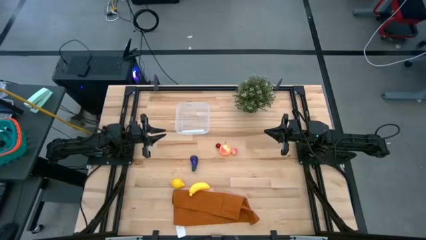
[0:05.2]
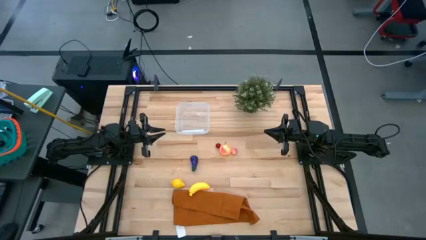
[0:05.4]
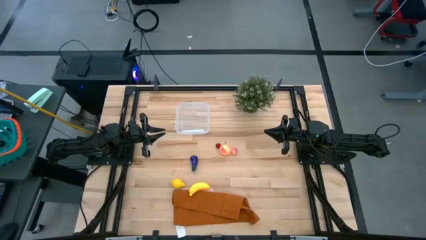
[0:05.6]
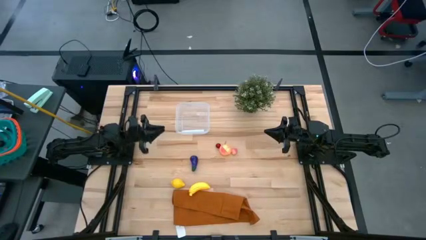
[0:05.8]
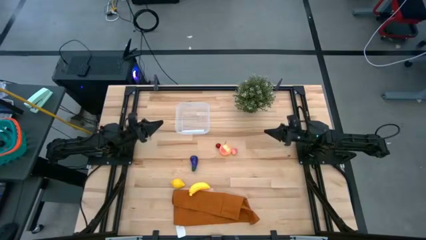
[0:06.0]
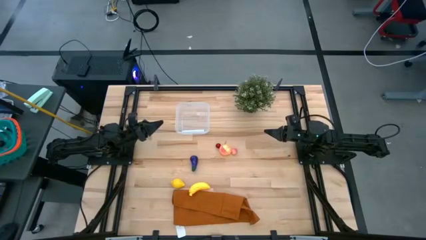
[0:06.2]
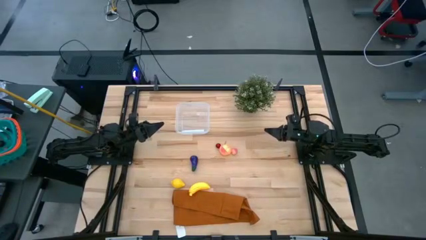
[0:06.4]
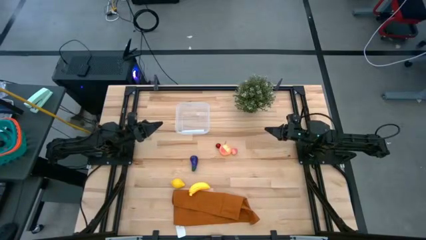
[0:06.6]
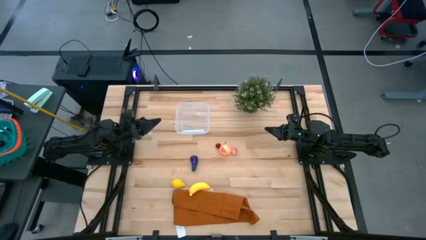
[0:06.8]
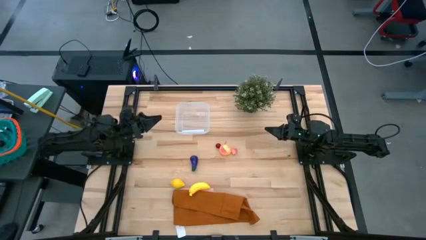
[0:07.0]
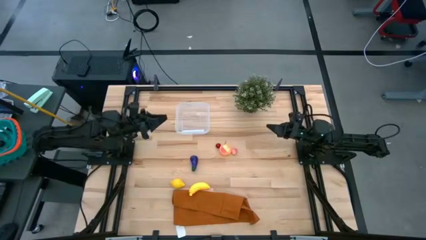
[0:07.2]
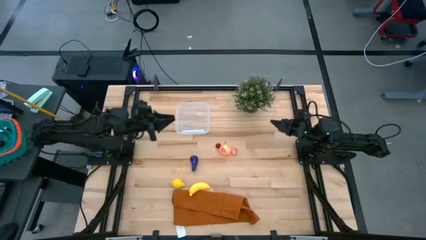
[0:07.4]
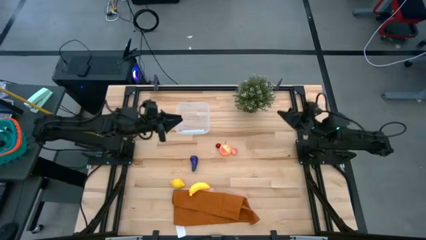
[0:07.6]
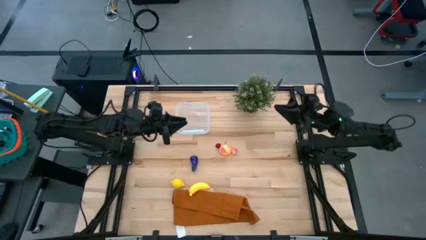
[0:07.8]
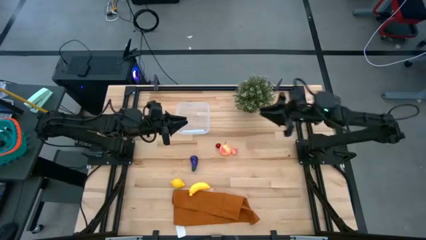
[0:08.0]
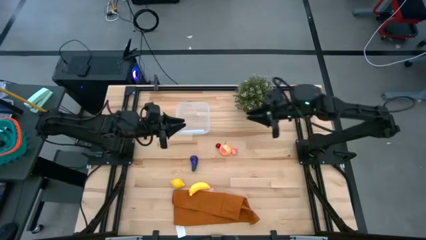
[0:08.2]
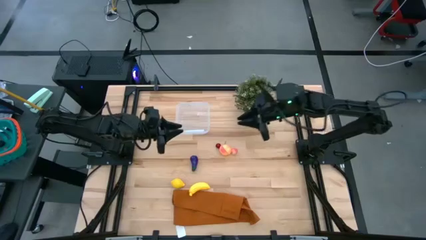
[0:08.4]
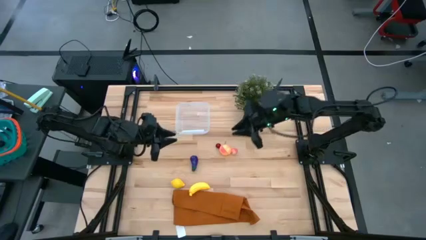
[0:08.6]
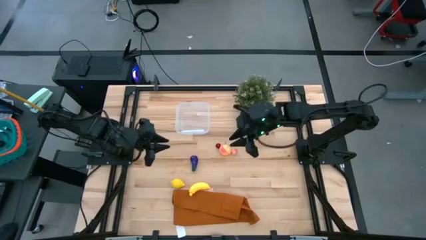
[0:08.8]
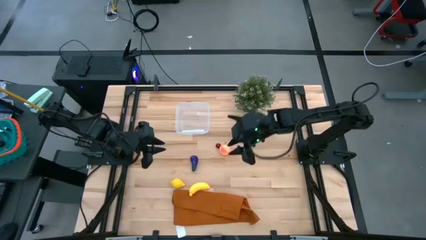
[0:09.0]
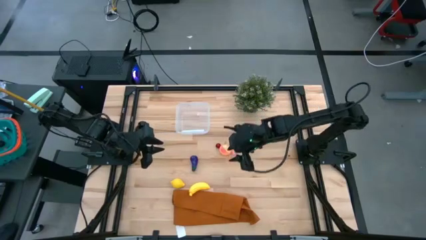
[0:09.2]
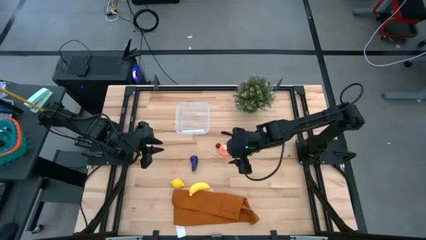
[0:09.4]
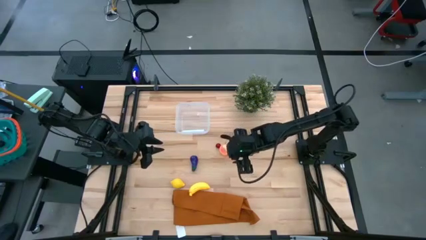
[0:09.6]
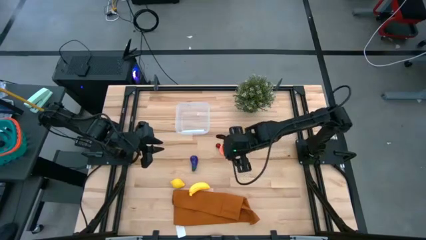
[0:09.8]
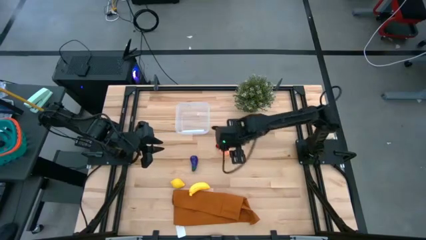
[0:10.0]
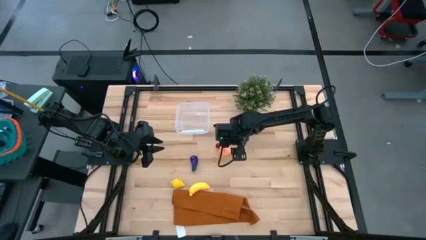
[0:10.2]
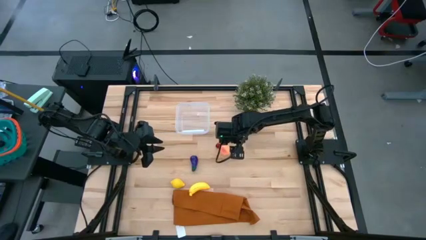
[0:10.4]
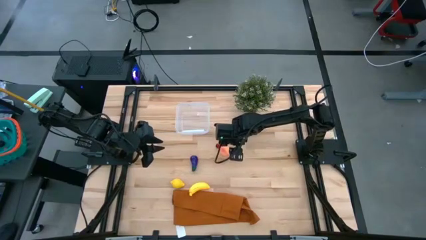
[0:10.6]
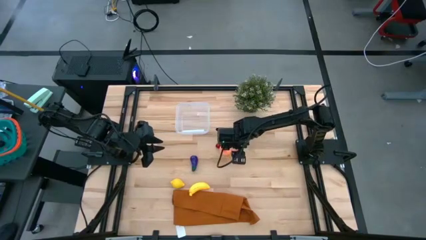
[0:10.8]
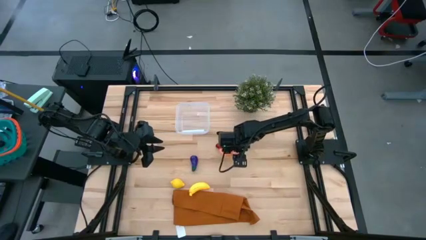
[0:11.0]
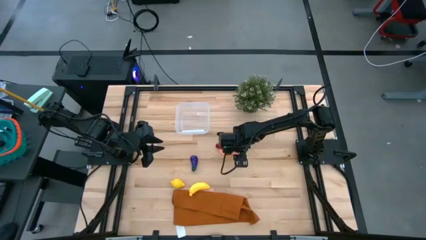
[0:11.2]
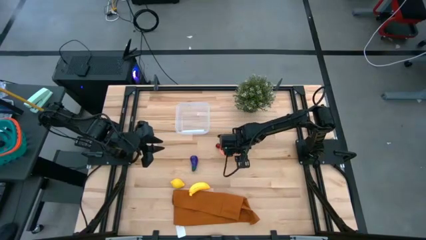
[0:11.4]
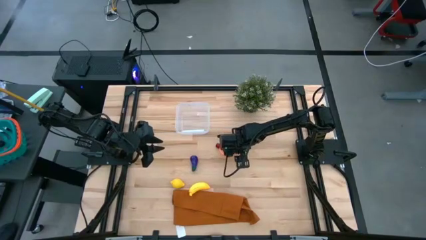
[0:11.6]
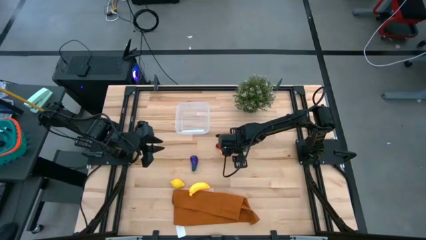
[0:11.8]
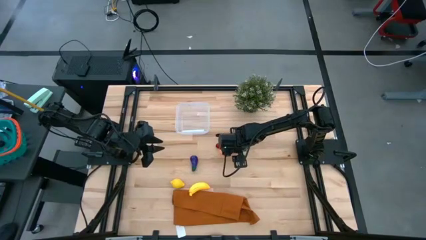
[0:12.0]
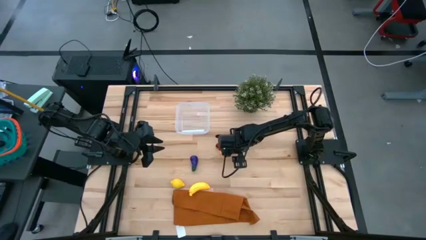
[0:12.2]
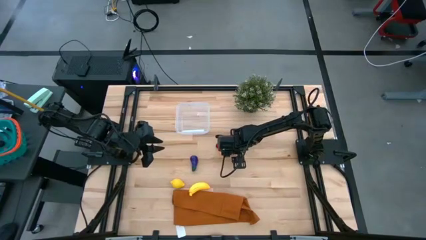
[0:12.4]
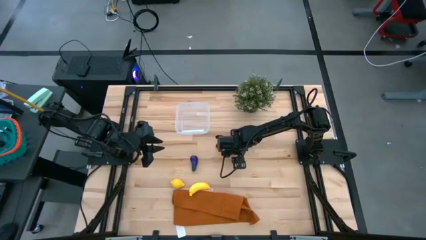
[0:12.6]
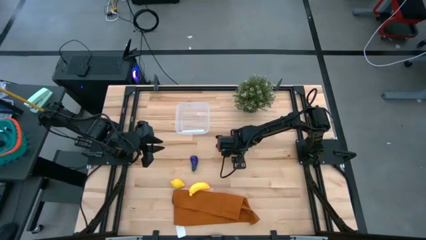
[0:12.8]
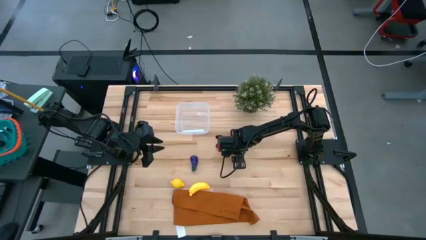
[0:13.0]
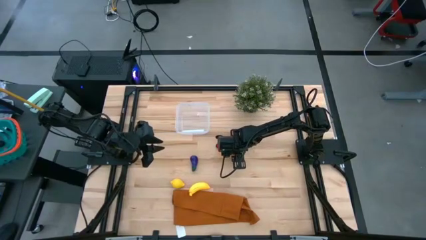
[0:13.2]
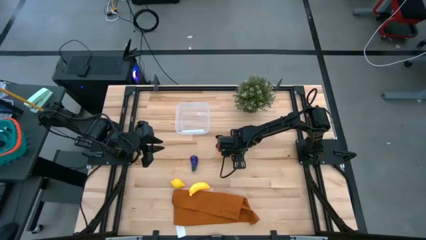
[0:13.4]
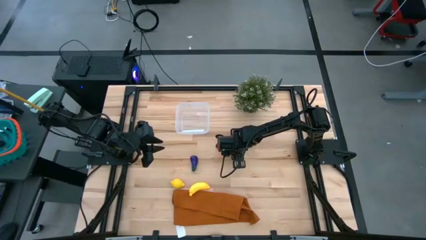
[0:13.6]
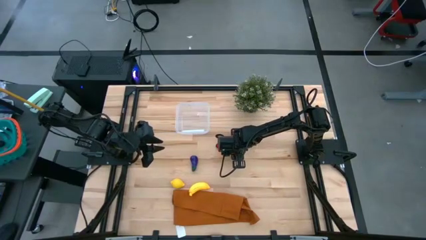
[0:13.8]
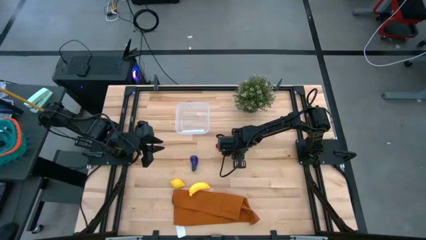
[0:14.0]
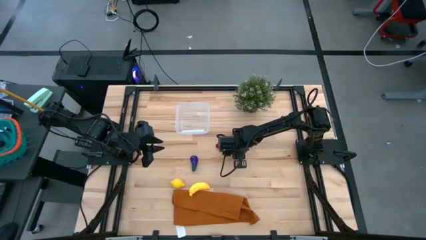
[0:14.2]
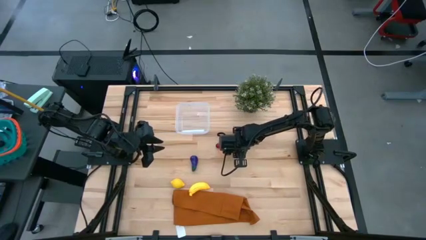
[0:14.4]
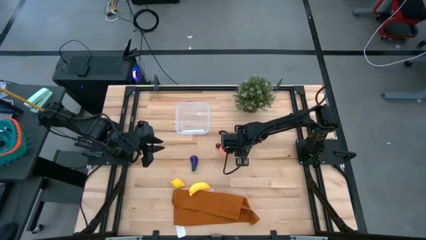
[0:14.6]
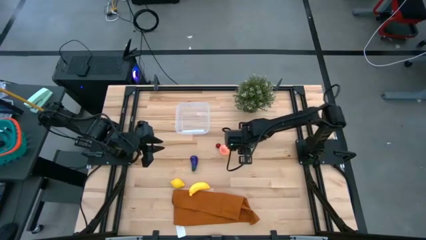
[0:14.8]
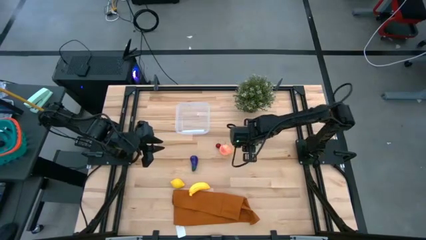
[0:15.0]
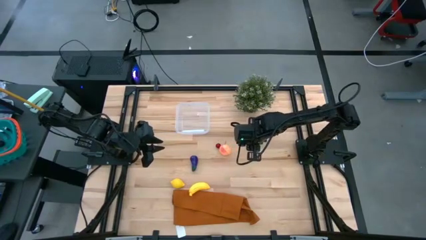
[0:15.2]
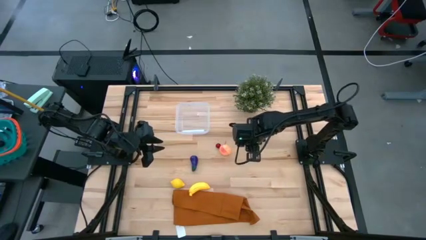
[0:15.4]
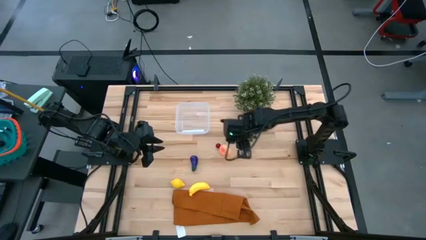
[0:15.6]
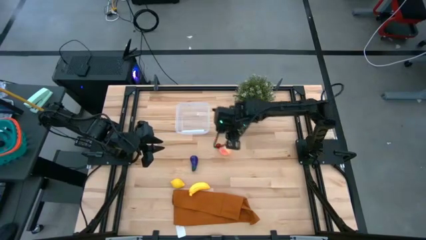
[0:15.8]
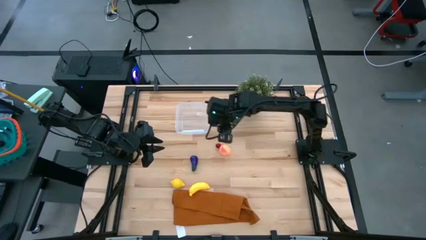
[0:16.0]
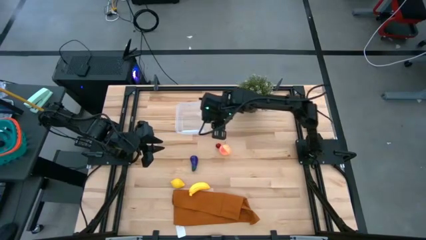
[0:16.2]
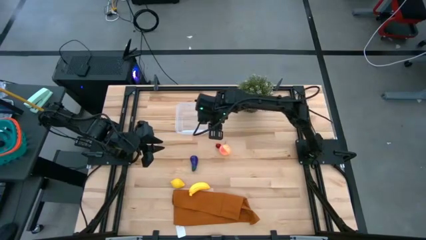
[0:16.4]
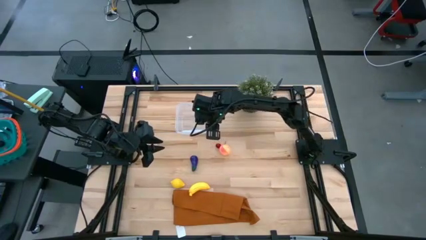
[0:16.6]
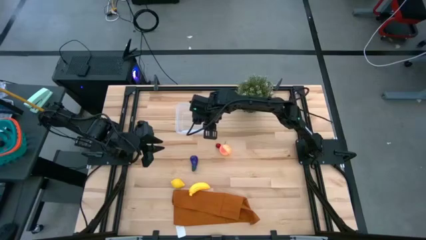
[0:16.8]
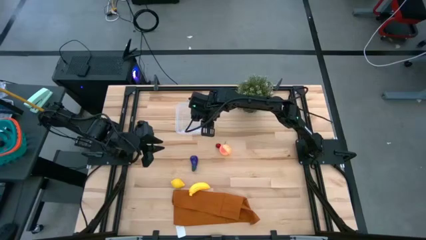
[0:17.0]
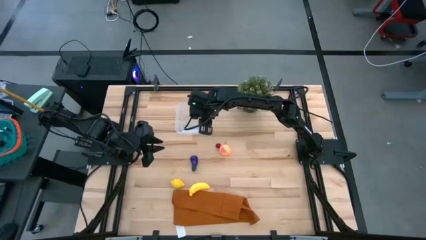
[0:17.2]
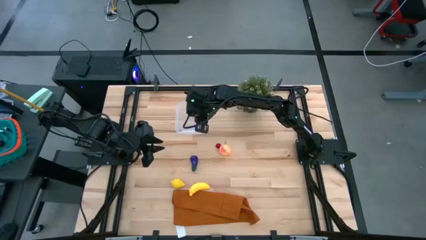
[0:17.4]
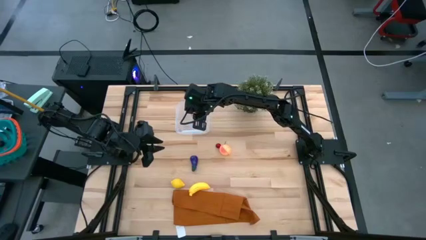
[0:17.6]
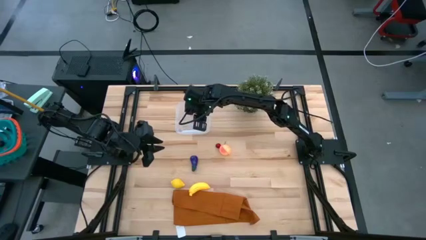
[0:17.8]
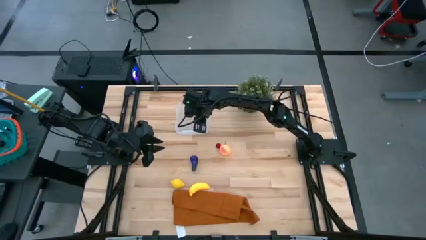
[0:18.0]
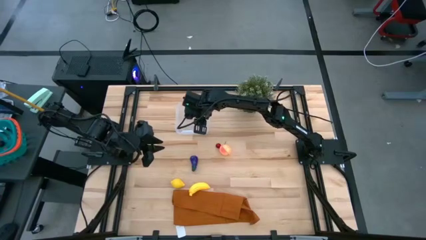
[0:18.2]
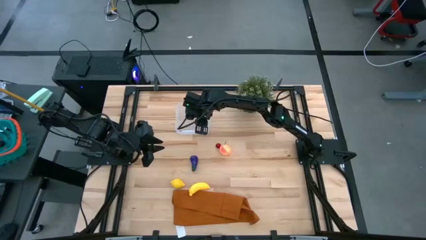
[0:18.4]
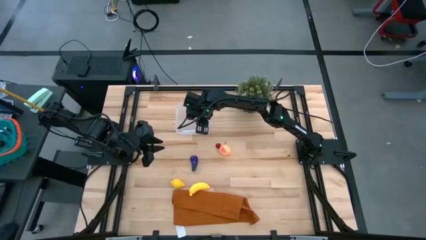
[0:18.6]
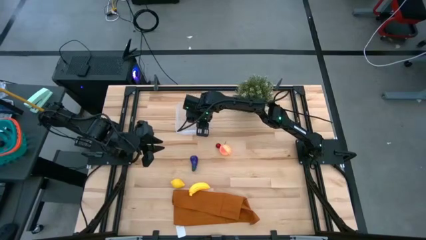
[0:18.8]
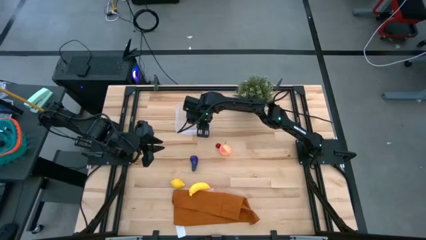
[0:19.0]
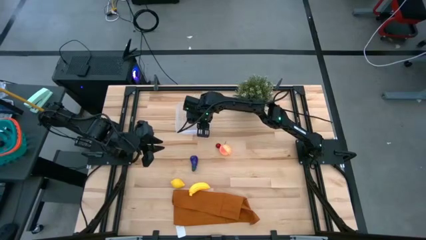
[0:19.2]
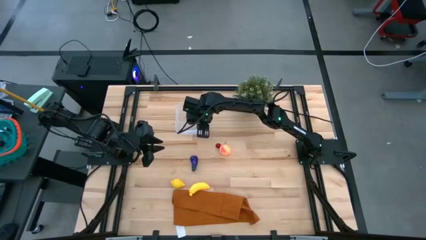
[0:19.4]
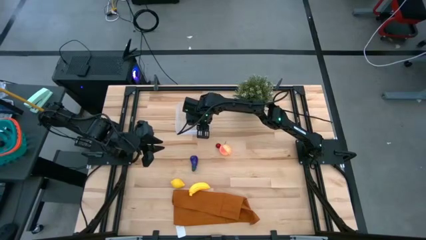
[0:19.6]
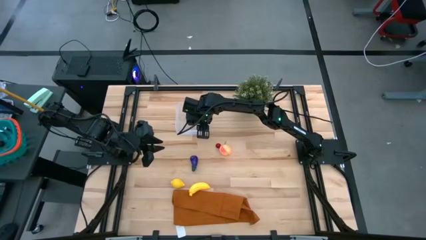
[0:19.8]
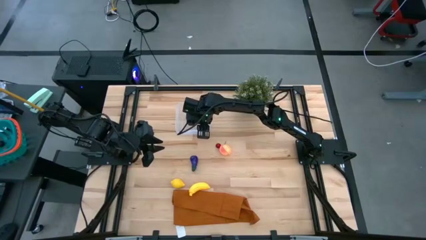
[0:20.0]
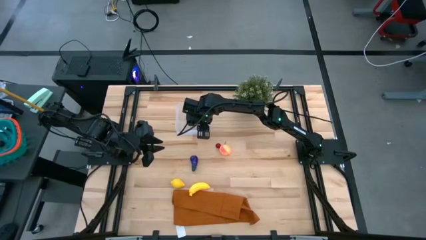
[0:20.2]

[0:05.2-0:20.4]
Task: Pick and placing Produce into tupperware
Put the peach into the container
